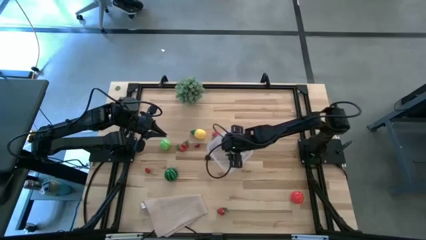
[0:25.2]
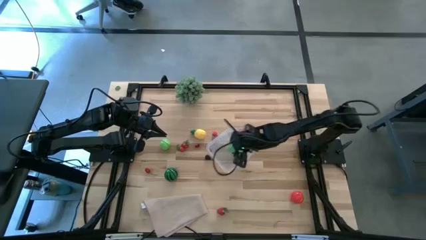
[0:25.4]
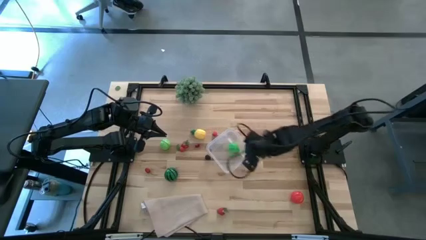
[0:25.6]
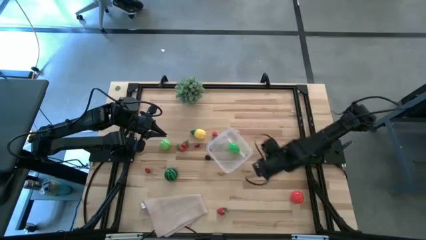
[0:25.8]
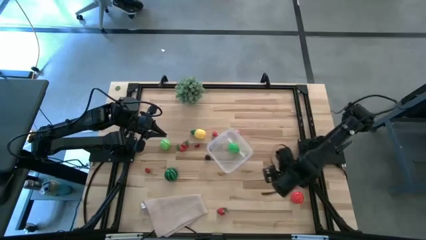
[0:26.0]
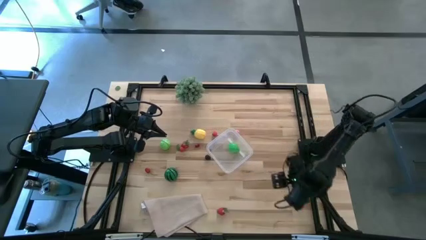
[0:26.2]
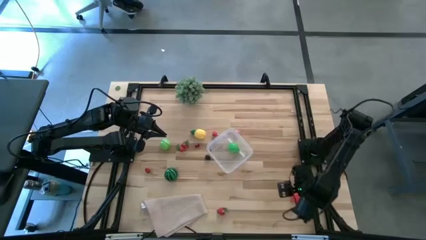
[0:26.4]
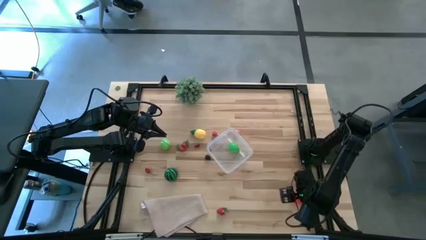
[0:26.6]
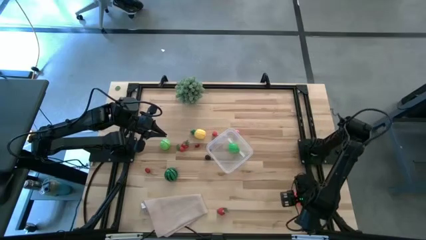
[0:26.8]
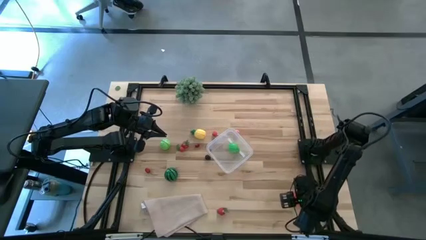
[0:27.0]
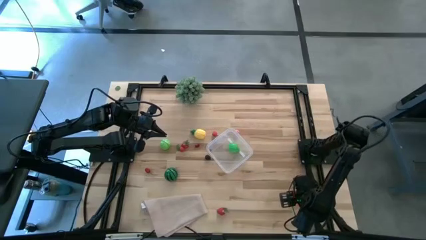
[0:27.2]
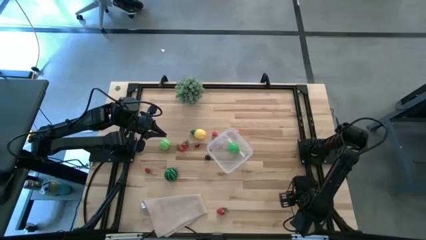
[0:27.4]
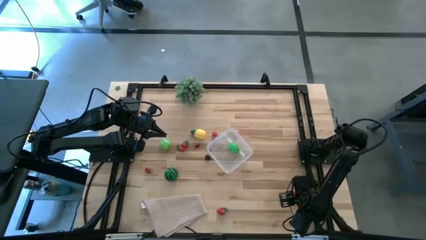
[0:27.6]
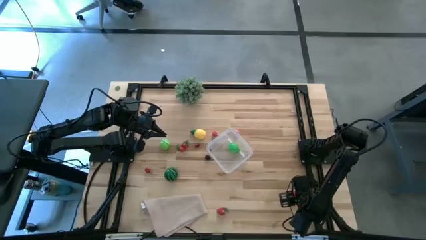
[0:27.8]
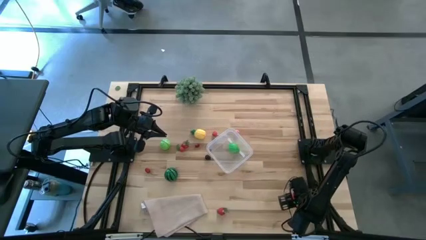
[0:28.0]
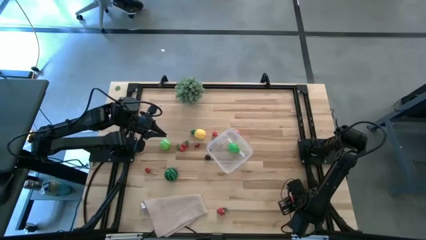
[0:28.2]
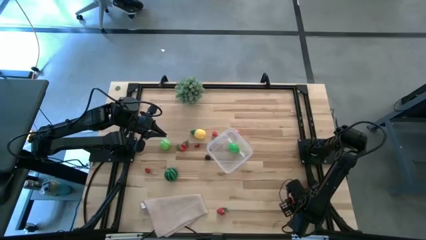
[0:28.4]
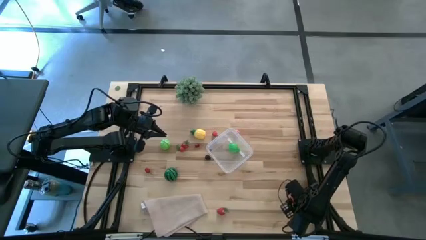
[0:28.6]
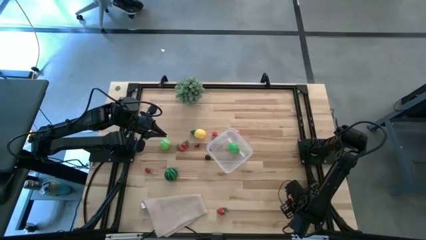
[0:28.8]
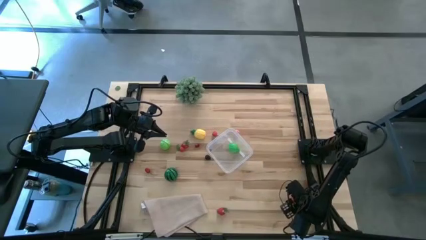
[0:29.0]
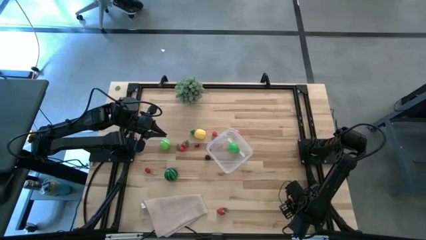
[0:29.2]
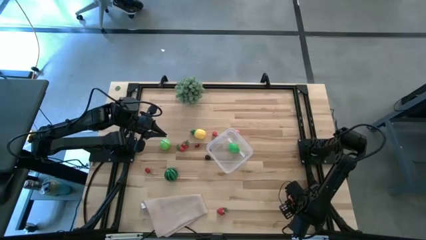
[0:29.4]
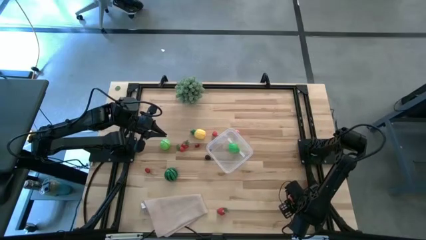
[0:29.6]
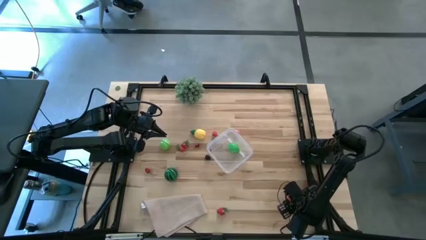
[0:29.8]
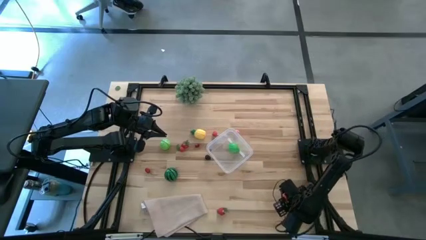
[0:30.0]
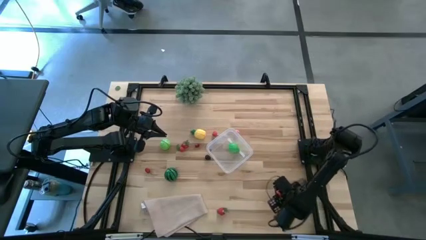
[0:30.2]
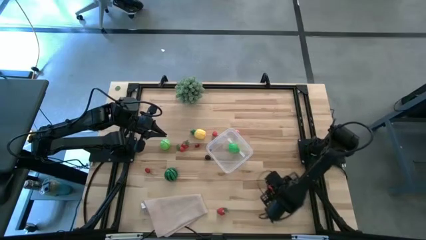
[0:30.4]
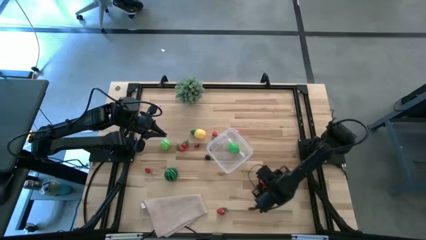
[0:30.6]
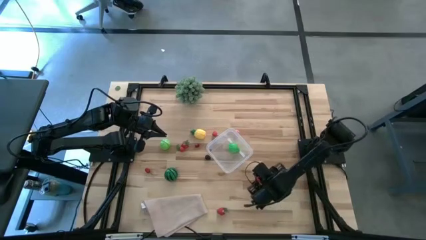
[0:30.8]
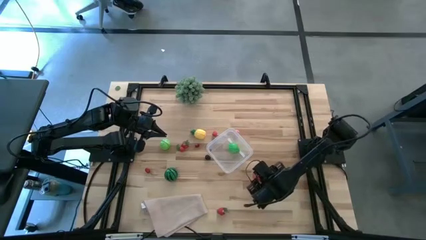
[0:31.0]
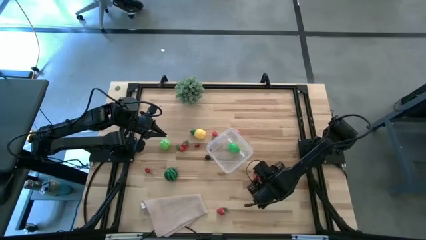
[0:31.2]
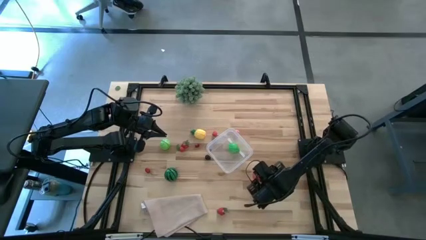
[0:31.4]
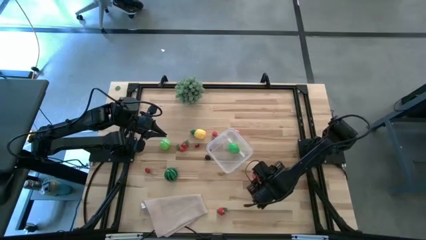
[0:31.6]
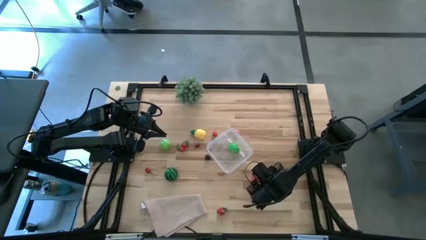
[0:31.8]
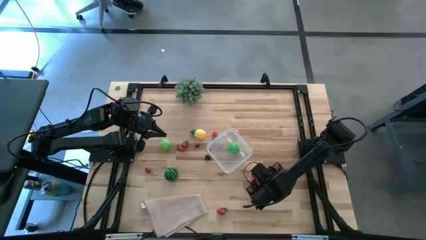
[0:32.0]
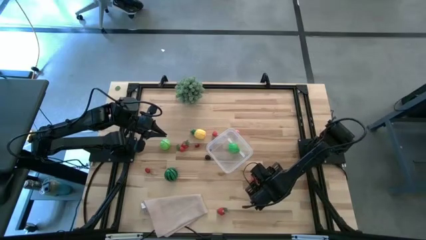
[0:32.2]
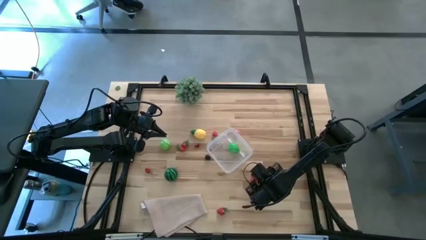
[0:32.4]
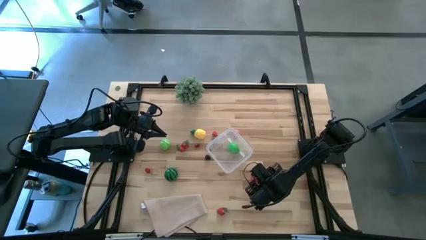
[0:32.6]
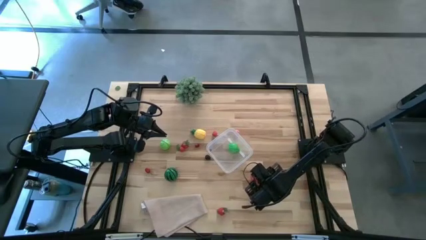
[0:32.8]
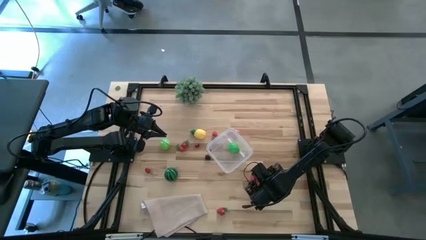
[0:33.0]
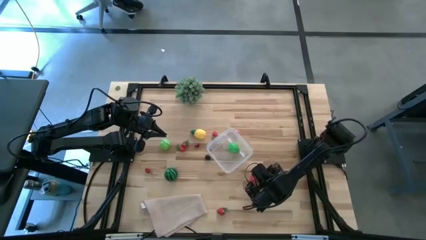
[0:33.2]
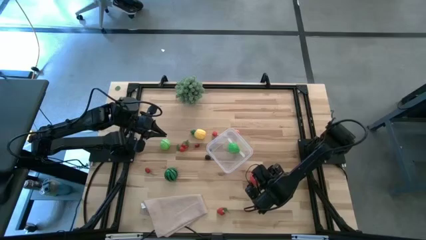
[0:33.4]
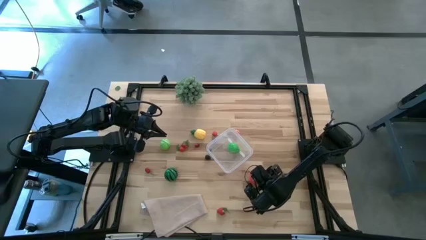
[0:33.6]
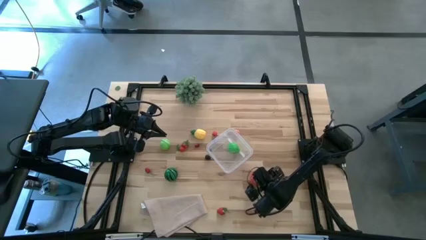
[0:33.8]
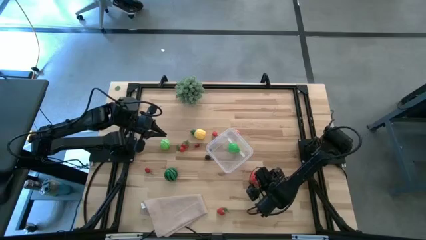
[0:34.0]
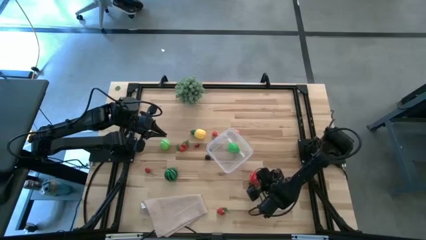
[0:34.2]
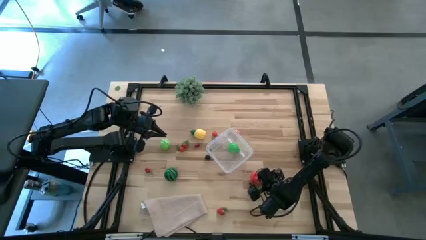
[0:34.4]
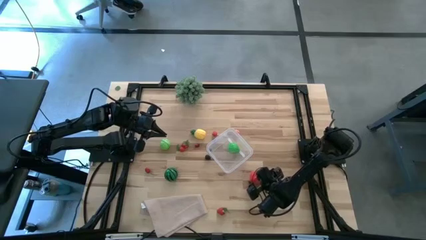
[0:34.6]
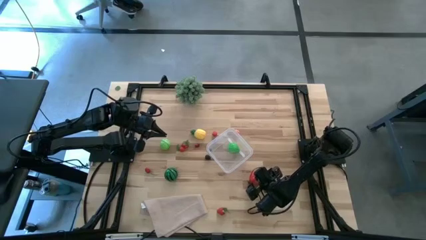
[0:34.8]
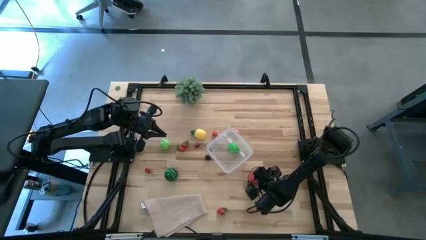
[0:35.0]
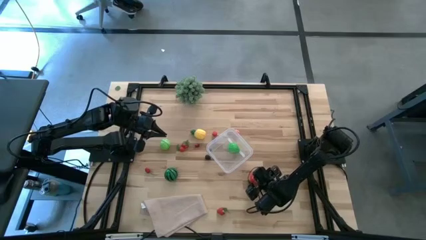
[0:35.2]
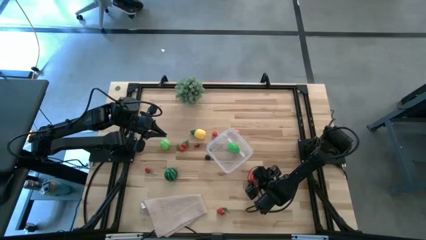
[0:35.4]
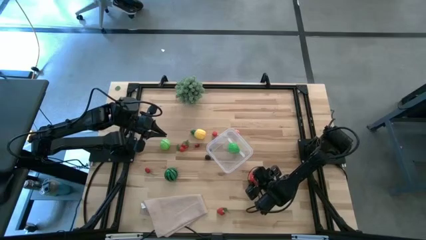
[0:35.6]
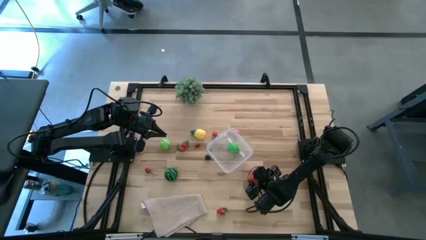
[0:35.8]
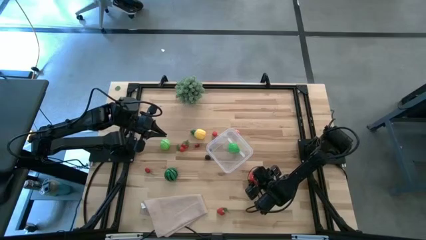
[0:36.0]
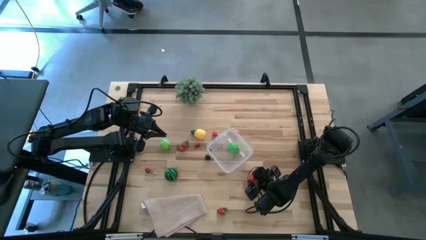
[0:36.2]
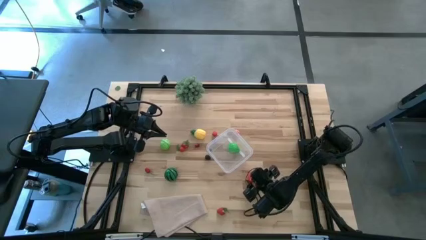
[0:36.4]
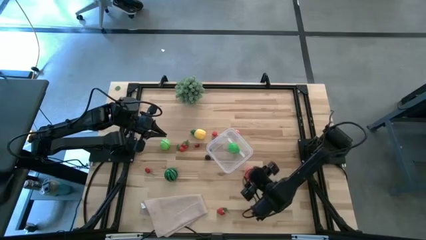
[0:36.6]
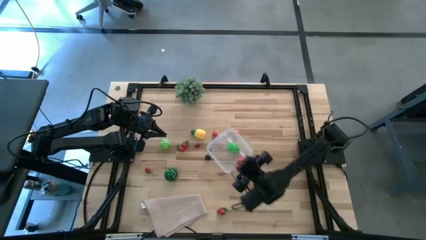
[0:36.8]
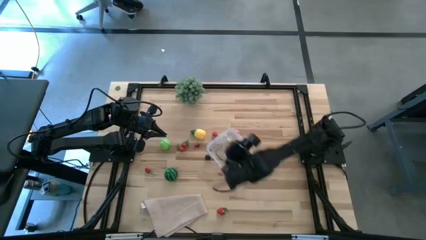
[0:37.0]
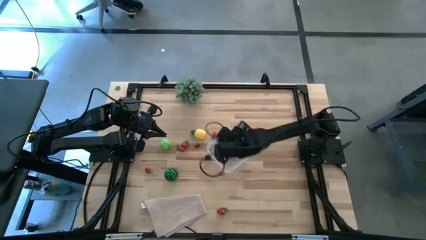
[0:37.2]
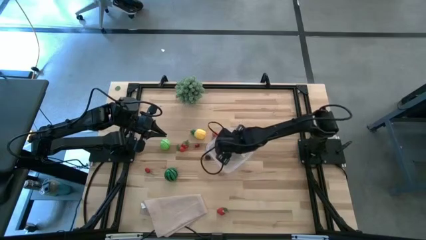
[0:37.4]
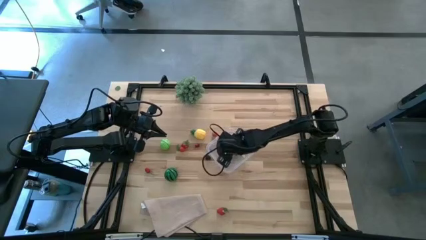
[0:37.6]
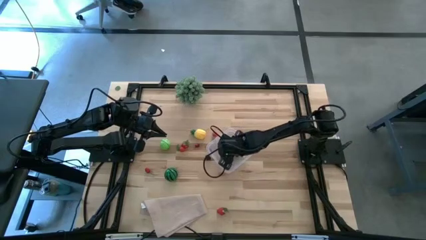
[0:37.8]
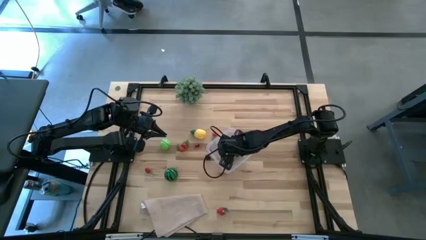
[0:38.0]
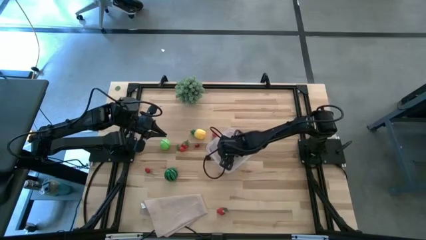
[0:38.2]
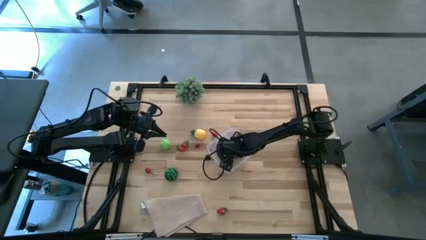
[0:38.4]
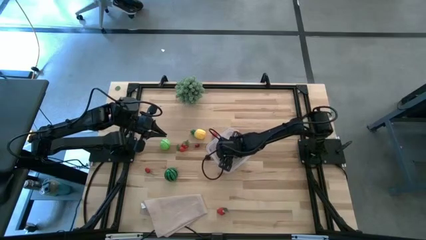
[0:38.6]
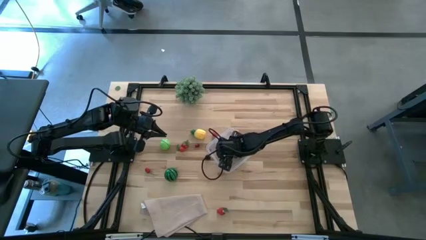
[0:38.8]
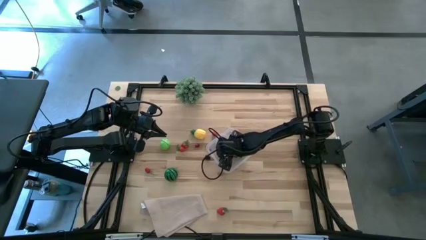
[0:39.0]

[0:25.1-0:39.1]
Task: Pick and placing Produce into tupperware
Put the tomato into the transparent bin

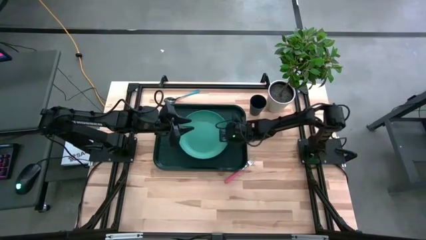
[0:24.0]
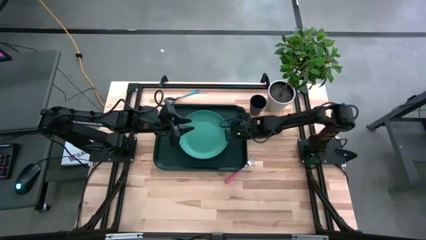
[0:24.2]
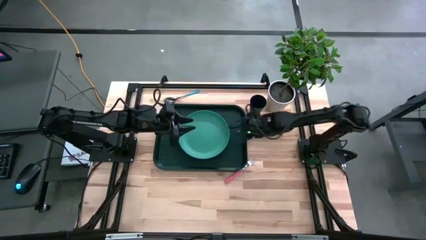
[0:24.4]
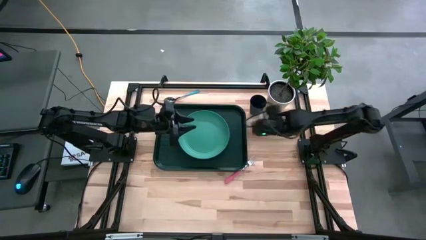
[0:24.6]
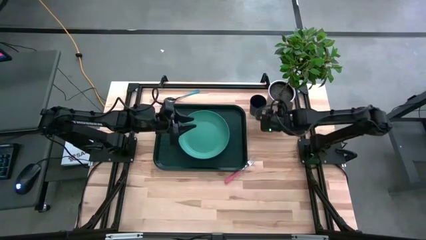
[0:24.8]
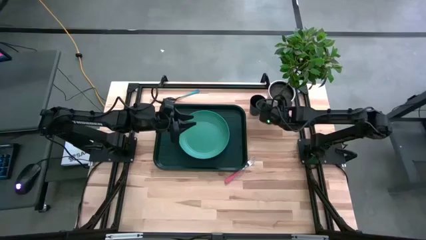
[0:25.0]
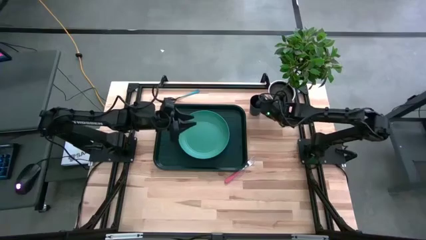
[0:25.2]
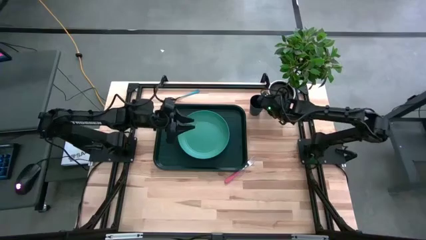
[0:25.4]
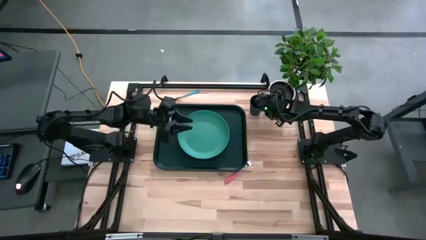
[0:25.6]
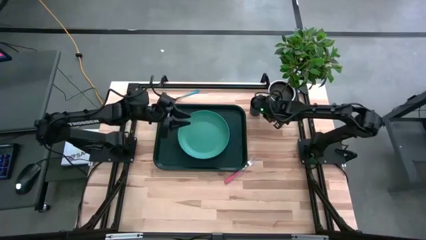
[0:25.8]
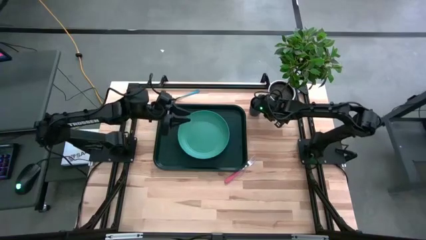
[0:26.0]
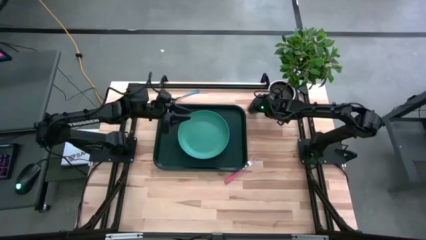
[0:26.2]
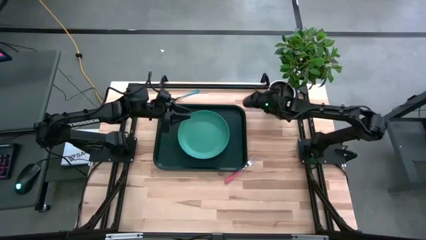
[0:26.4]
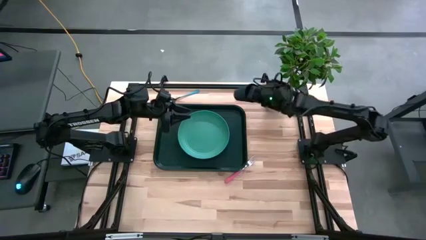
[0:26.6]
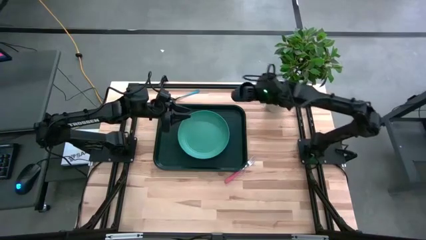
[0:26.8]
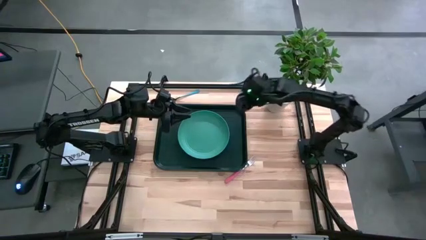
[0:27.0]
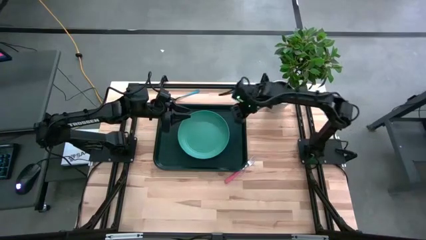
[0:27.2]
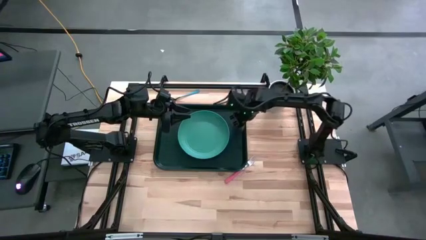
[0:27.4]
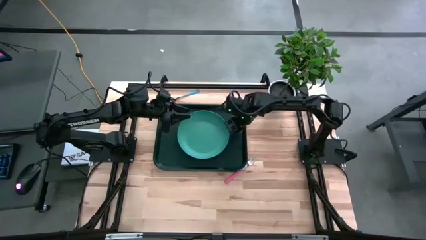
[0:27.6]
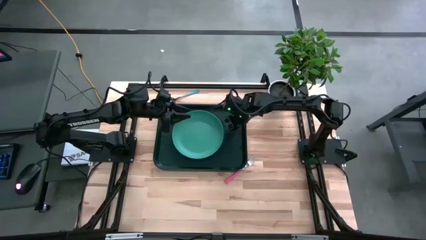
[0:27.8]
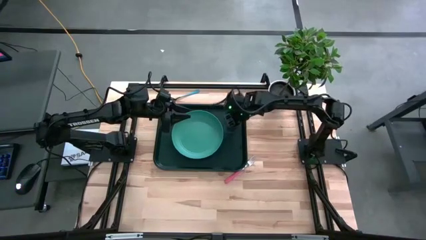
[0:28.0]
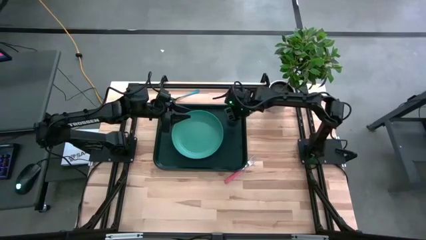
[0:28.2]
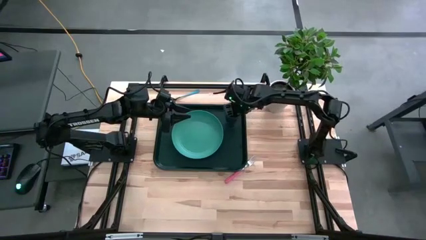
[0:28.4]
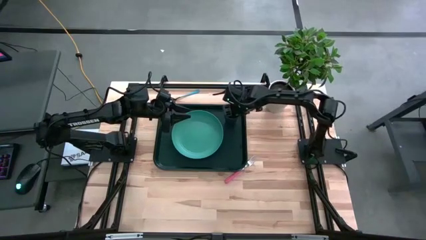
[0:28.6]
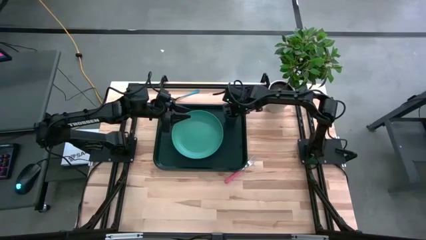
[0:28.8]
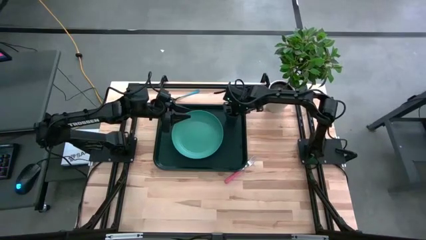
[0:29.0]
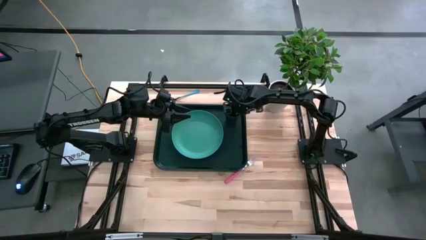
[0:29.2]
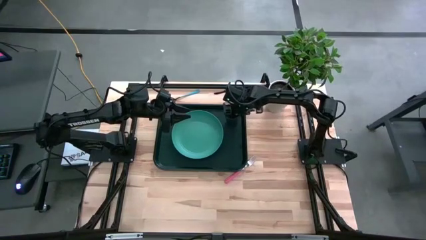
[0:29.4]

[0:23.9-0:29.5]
Task: Pick and place plate/cup/fork/spoon on tray
Put the black cup on the black serving tray to the top right of the green plate
